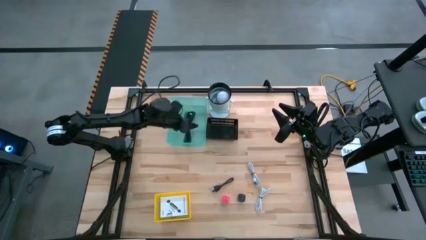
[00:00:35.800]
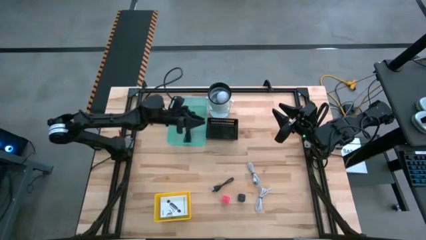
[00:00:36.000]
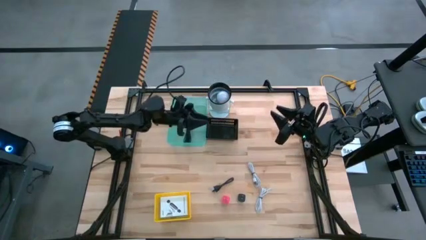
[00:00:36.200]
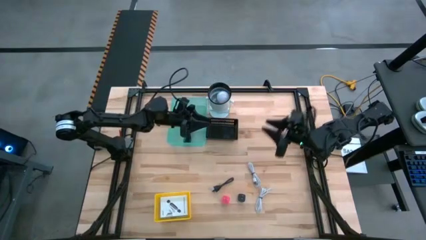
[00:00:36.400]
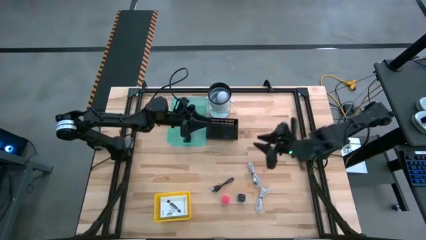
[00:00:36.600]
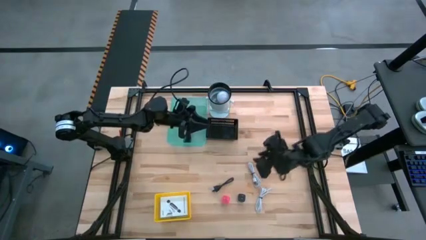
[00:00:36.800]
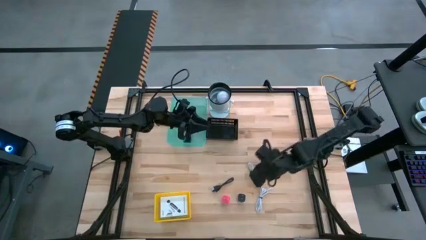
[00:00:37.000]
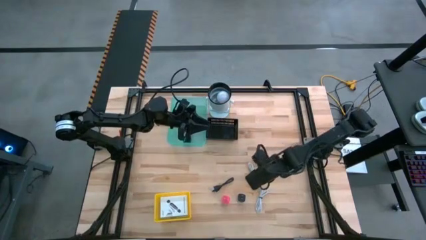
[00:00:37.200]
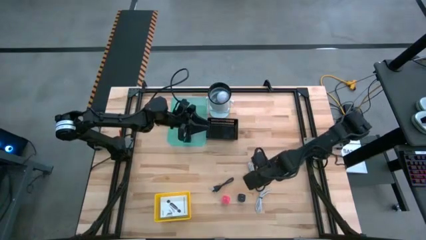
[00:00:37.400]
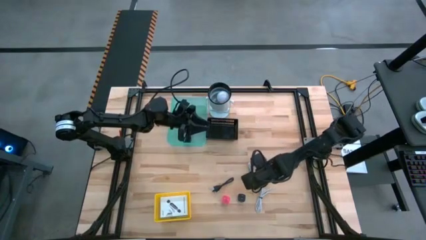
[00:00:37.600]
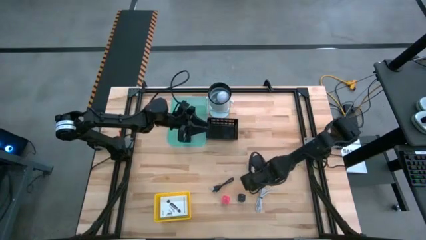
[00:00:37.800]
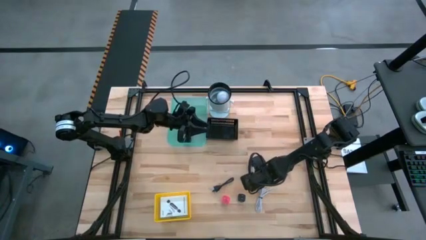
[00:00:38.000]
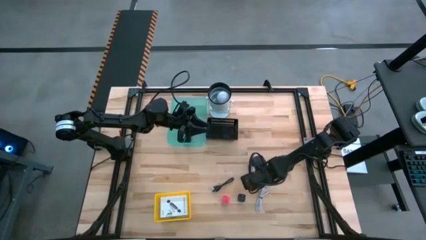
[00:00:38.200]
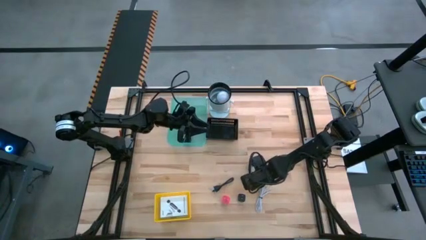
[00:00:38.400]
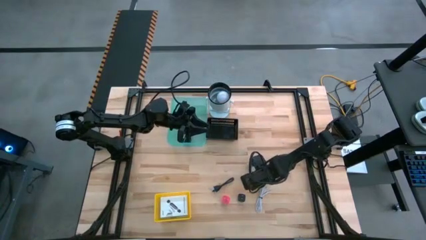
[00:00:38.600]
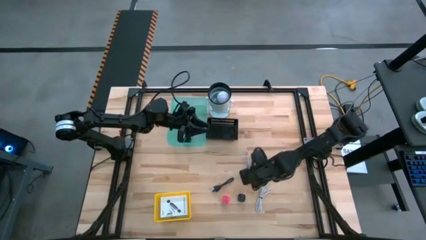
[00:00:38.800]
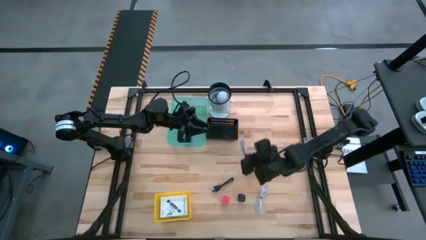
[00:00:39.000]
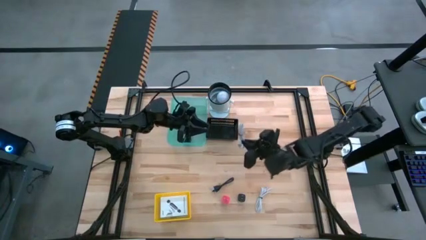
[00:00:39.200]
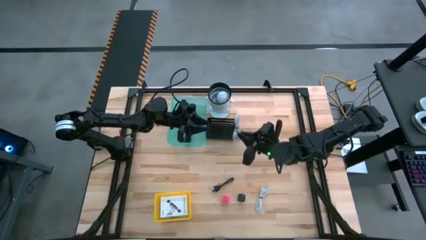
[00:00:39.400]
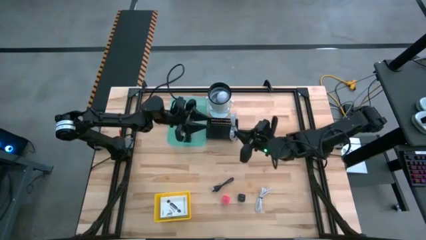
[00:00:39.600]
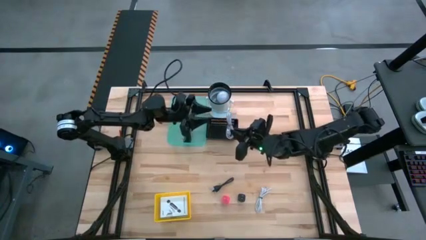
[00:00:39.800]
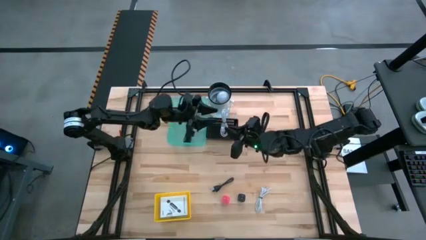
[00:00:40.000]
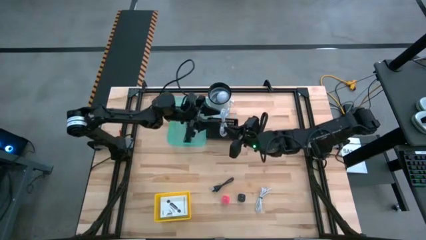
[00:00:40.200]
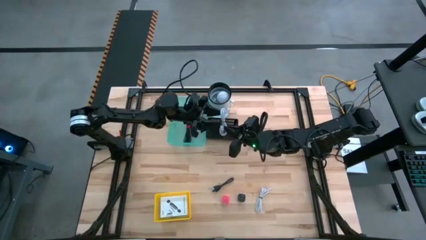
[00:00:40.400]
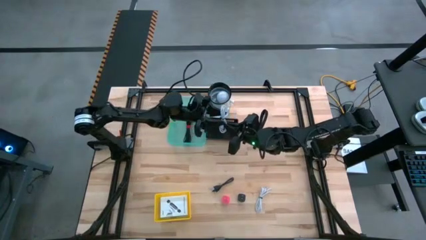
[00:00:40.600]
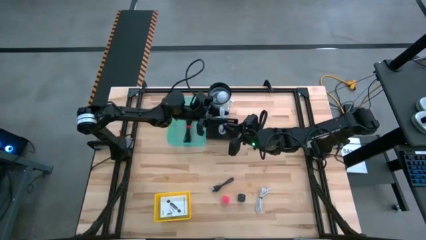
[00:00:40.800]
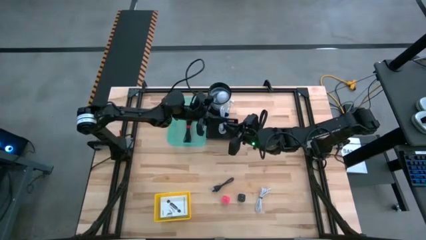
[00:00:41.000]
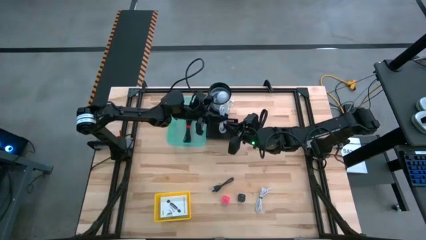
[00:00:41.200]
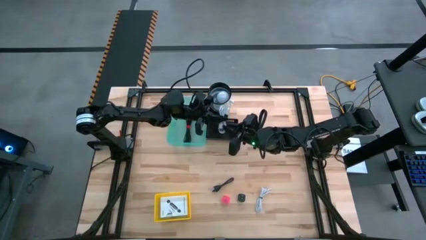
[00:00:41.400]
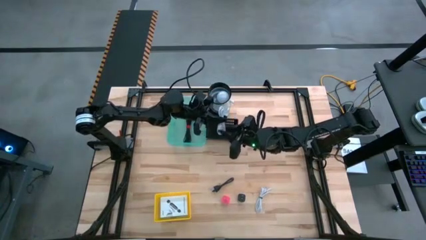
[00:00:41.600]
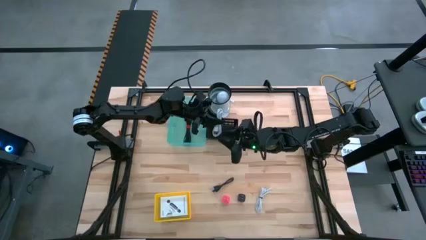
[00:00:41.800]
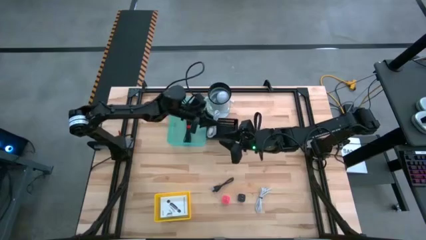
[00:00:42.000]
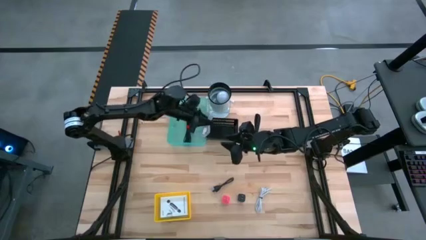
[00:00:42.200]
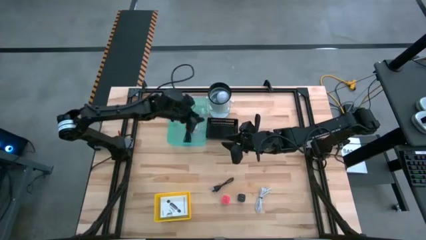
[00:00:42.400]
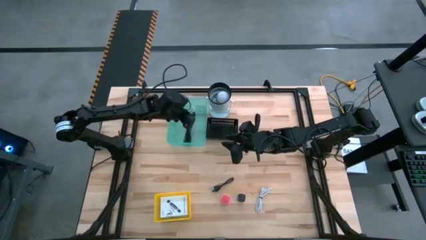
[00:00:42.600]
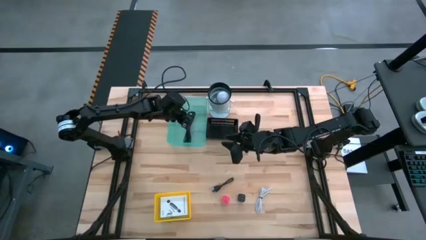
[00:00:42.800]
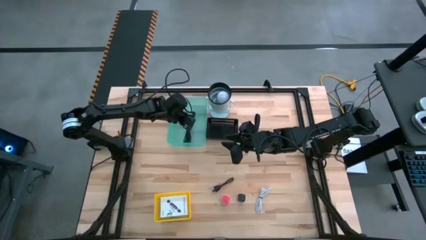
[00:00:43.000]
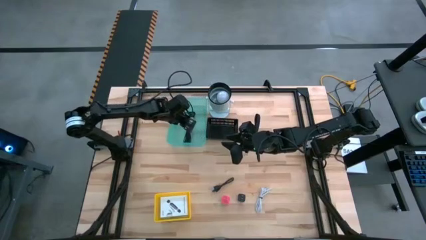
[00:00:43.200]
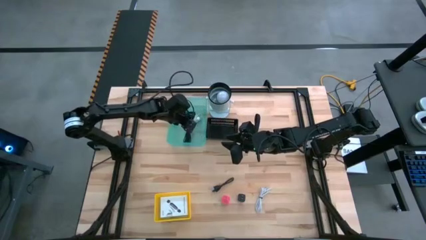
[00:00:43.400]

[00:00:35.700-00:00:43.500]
Task: Pick and place items into bin
Put the top white charger cable into the green bin

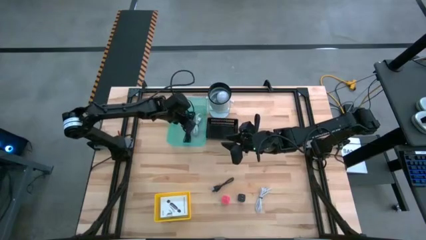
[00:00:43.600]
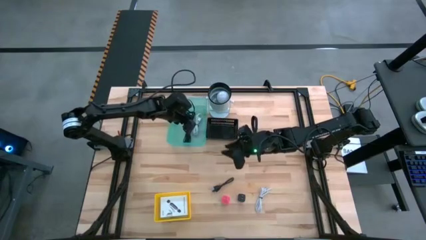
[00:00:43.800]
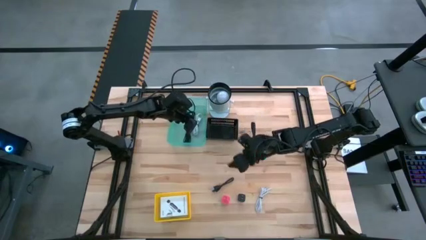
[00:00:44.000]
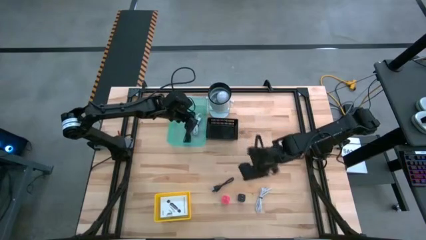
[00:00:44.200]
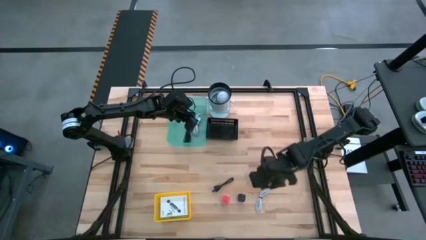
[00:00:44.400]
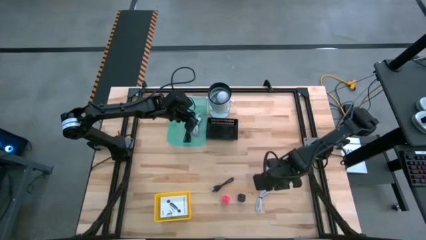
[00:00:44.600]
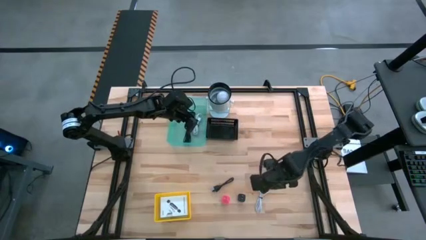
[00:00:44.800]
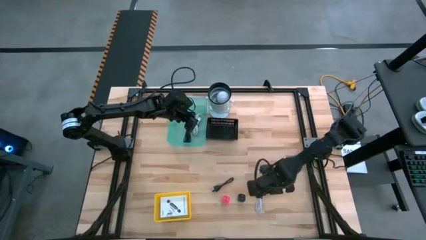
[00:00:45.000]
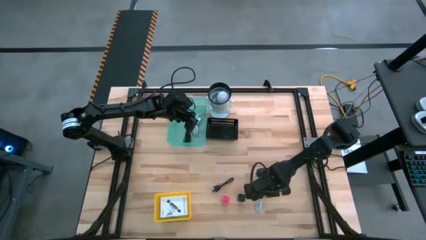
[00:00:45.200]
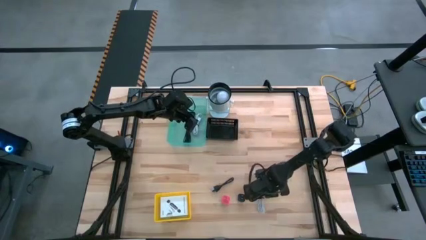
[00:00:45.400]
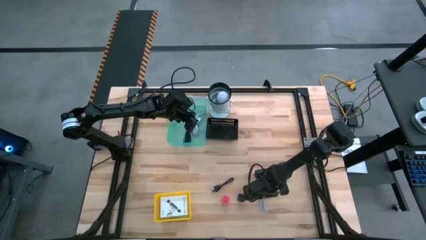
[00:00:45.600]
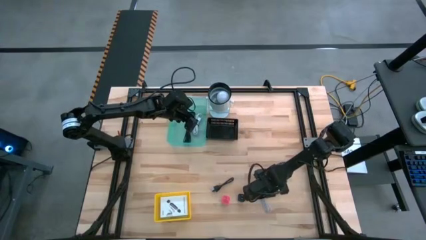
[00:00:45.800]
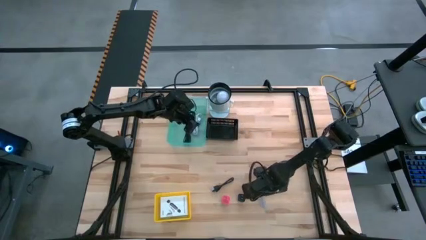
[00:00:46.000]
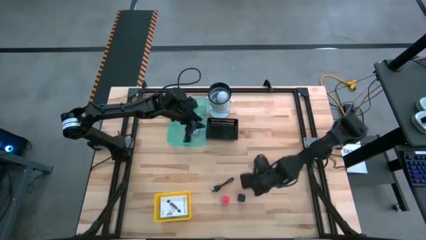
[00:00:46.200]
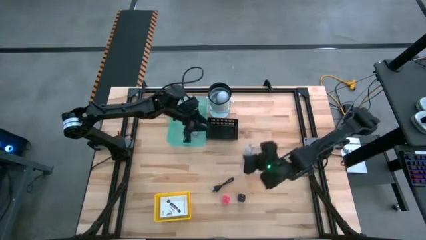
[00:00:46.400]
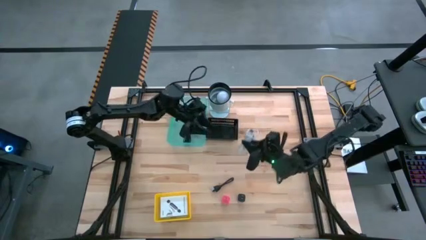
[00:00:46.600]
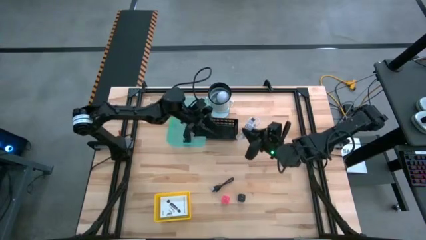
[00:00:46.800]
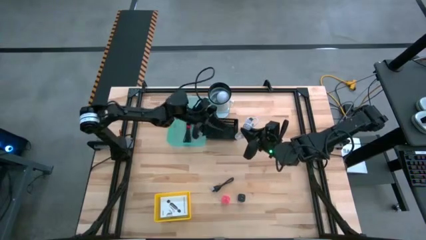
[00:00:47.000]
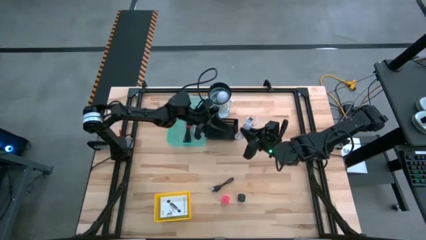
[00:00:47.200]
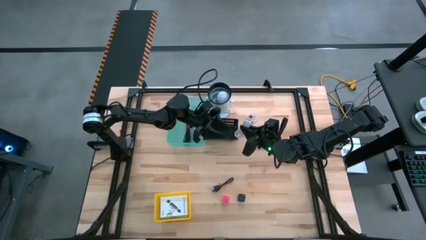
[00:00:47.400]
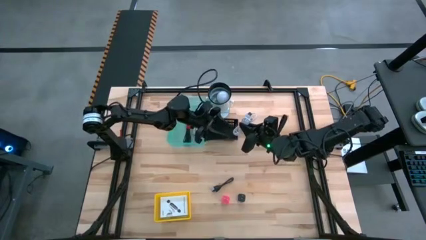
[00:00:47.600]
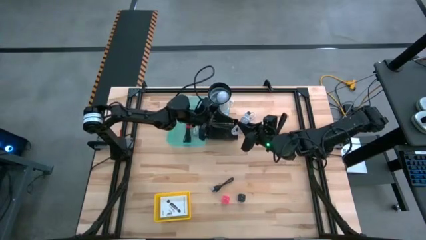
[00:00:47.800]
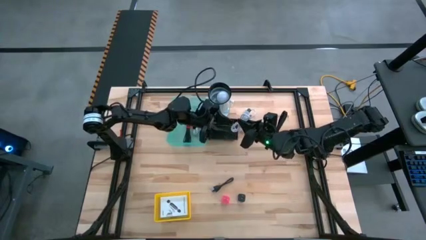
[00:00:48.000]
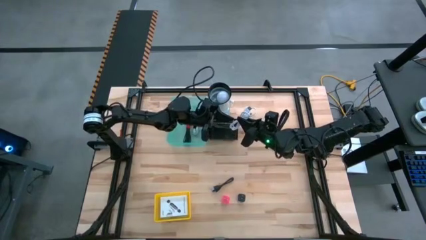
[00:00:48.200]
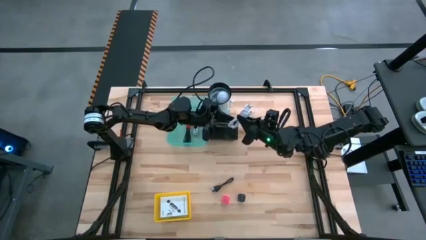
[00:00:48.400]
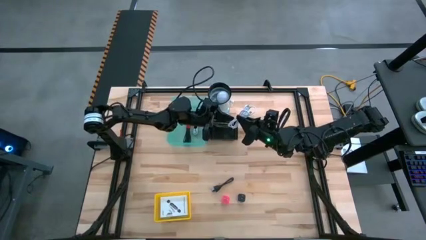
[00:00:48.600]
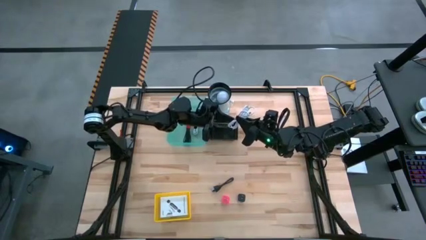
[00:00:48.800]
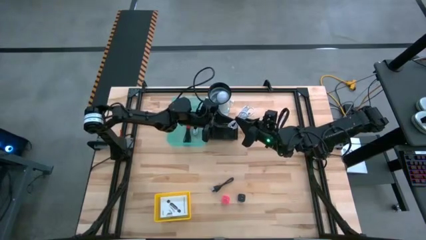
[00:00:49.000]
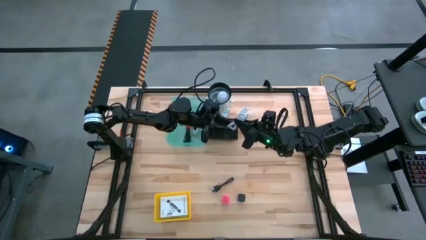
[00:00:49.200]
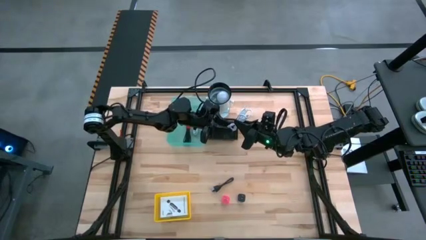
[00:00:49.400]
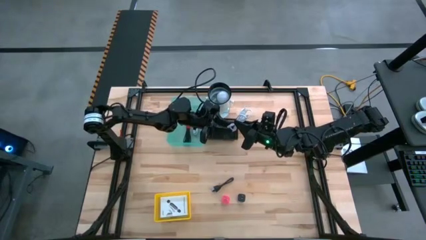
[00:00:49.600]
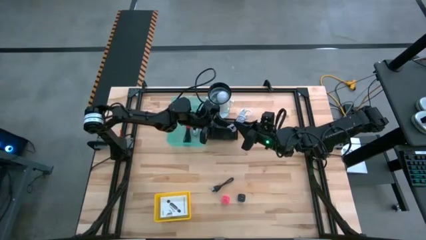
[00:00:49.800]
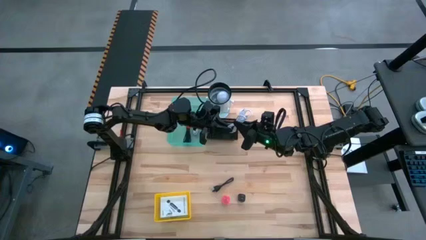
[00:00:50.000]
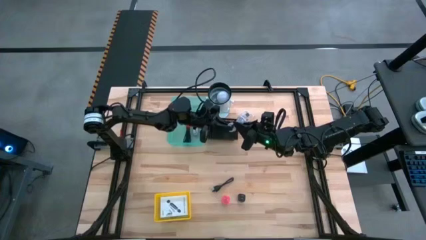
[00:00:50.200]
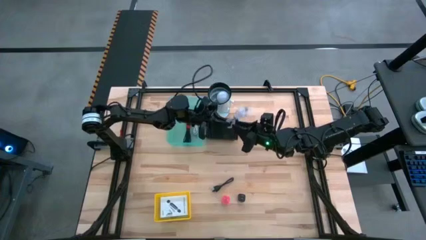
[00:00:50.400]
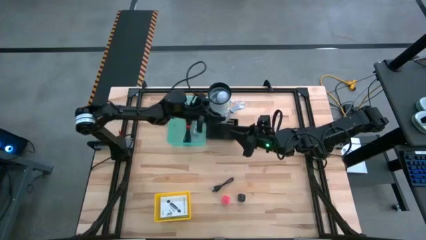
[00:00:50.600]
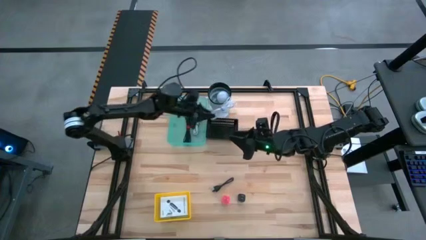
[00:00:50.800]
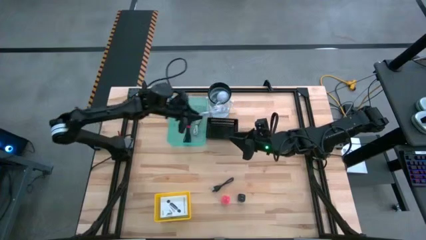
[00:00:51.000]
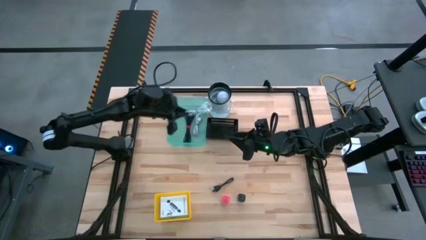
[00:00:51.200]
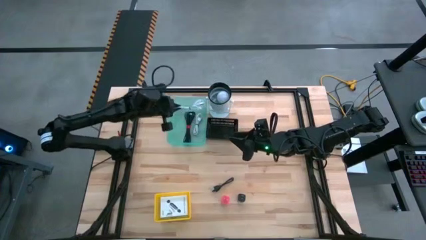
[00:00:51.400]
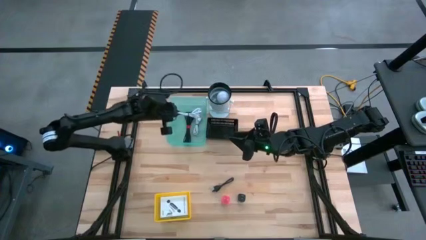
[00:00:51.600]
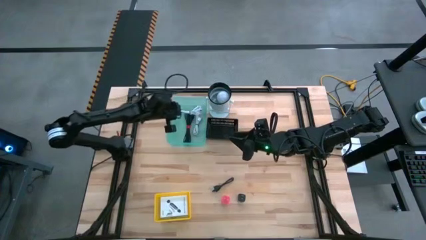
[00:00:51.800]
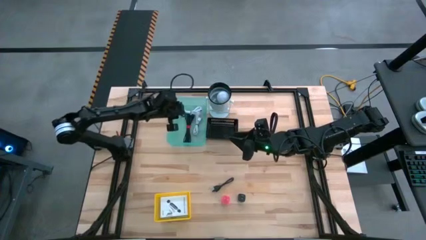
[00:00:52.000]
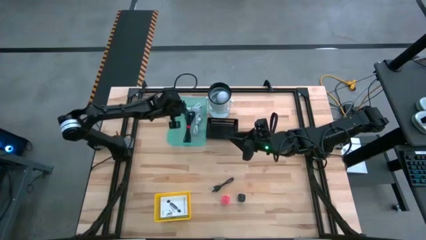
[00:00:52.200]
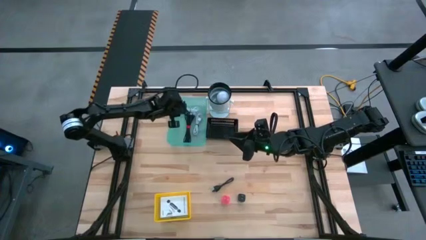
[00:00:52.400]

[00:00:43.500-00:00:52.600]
Put the white charger cable into the green bin
